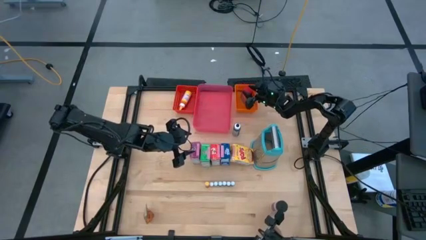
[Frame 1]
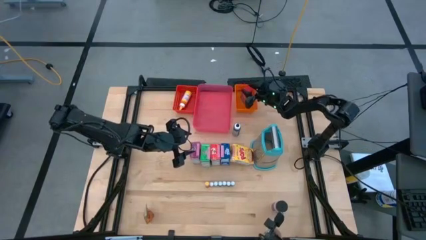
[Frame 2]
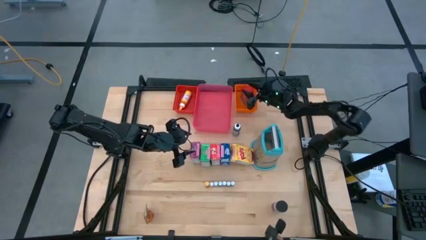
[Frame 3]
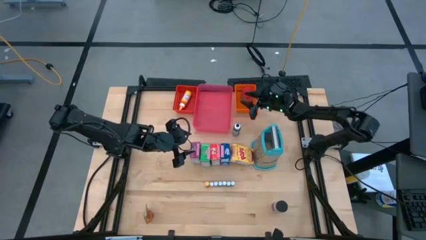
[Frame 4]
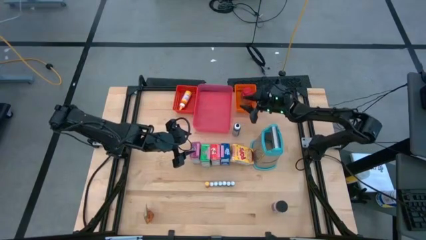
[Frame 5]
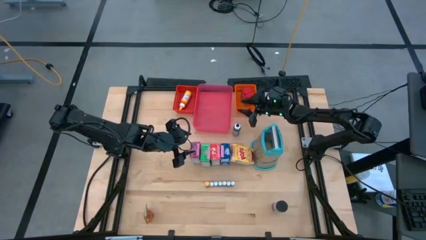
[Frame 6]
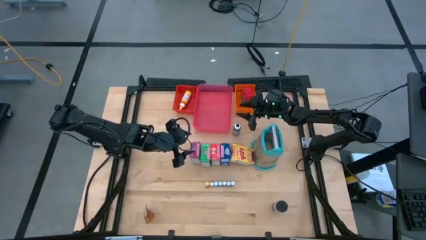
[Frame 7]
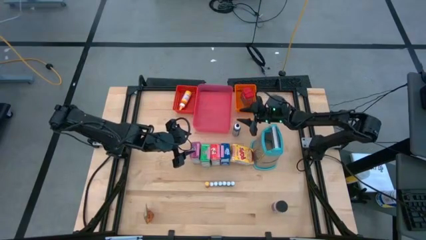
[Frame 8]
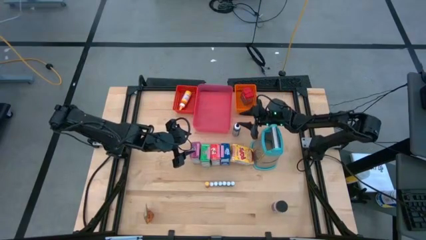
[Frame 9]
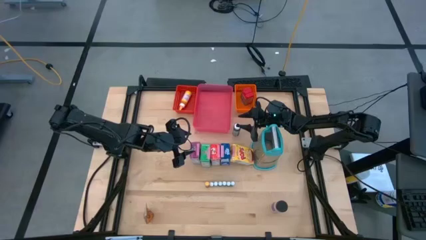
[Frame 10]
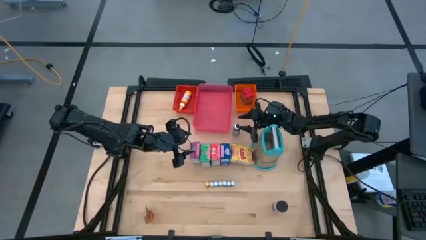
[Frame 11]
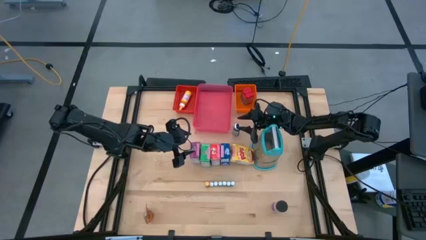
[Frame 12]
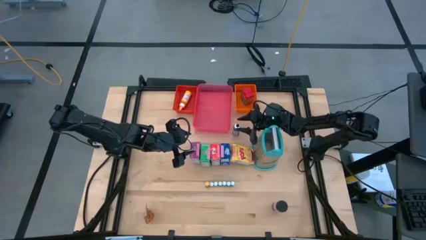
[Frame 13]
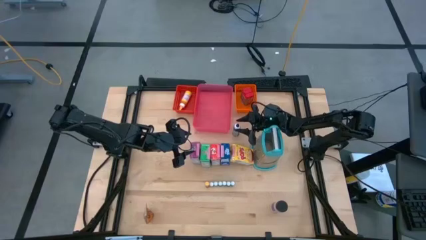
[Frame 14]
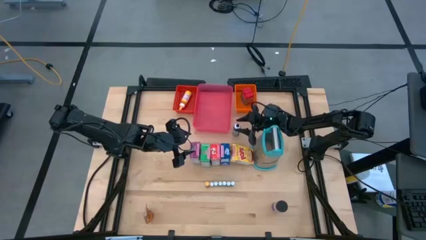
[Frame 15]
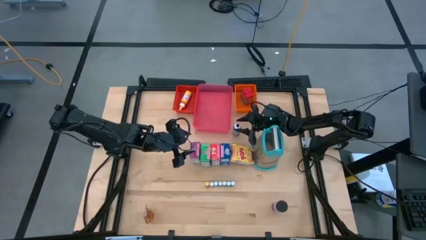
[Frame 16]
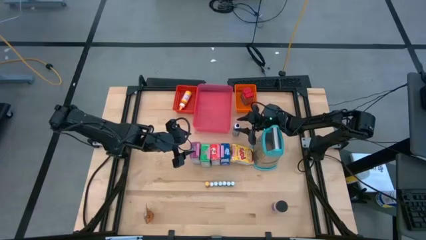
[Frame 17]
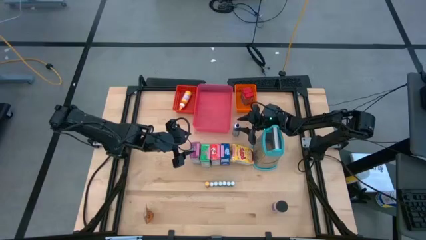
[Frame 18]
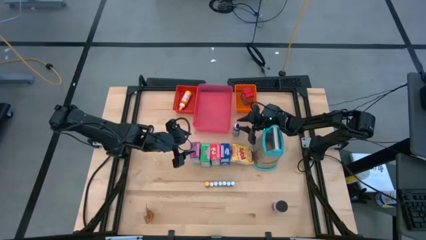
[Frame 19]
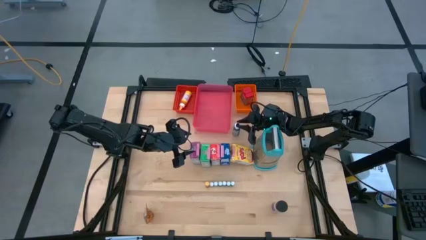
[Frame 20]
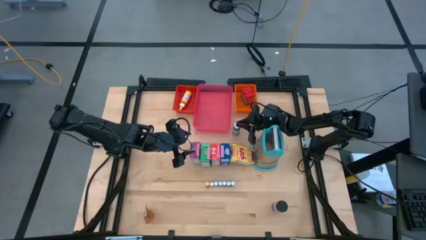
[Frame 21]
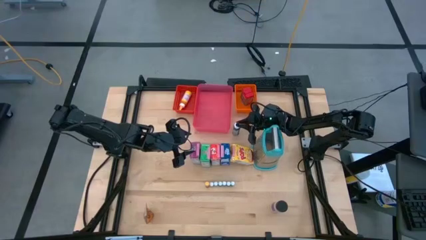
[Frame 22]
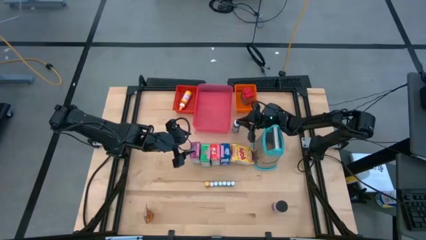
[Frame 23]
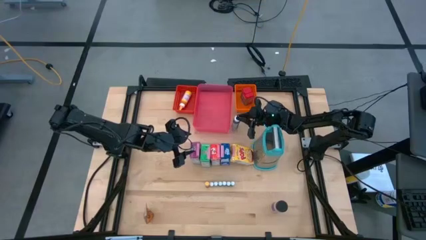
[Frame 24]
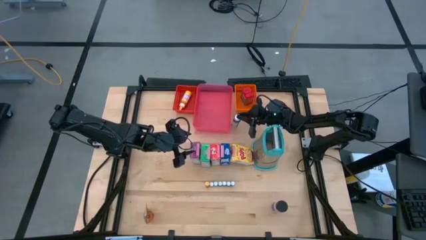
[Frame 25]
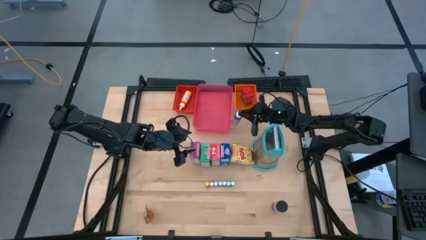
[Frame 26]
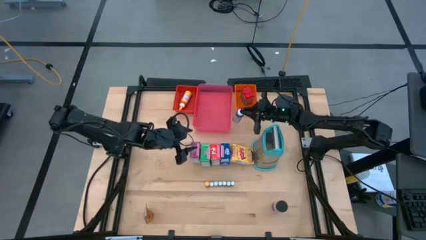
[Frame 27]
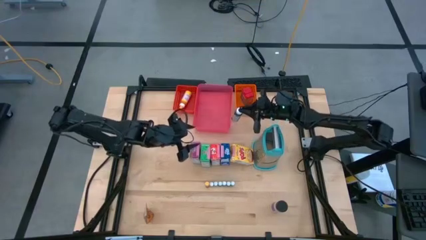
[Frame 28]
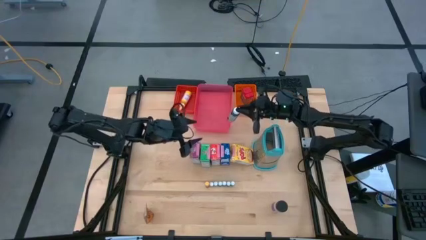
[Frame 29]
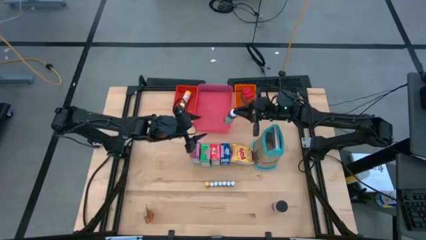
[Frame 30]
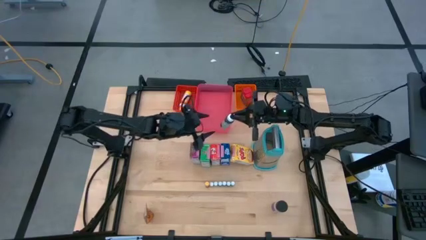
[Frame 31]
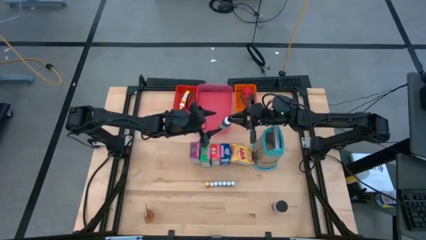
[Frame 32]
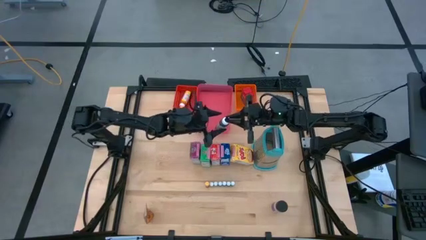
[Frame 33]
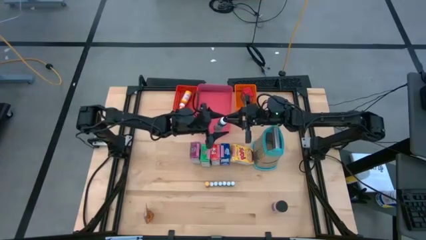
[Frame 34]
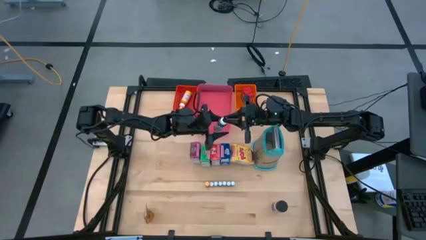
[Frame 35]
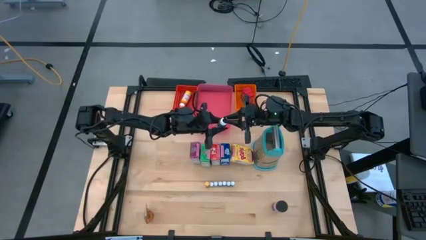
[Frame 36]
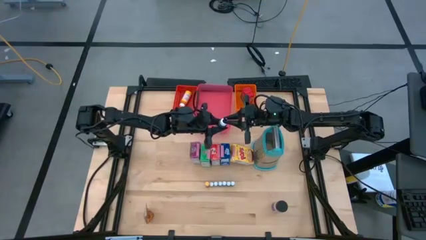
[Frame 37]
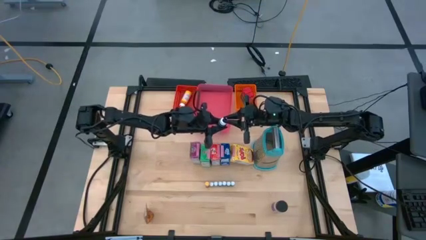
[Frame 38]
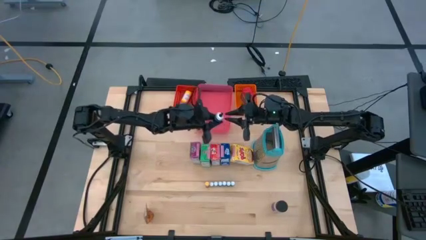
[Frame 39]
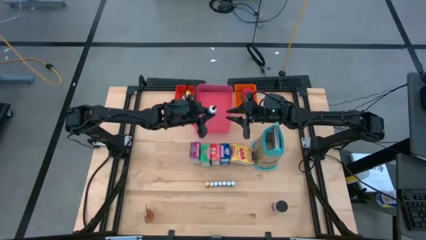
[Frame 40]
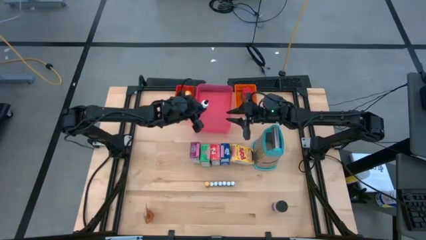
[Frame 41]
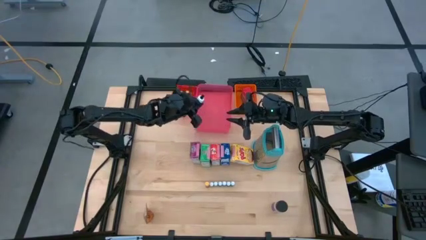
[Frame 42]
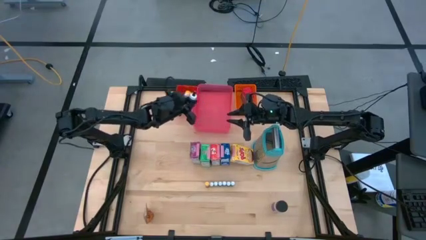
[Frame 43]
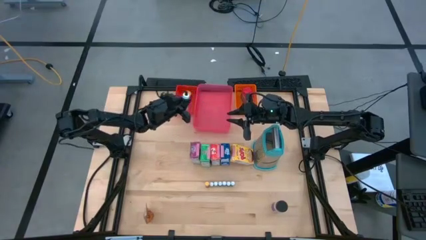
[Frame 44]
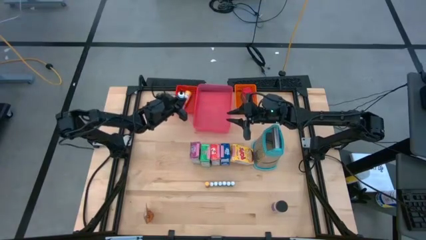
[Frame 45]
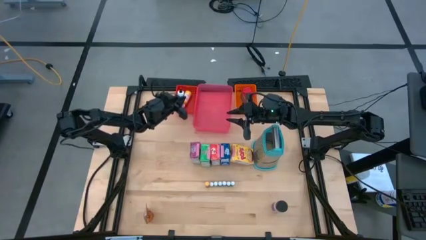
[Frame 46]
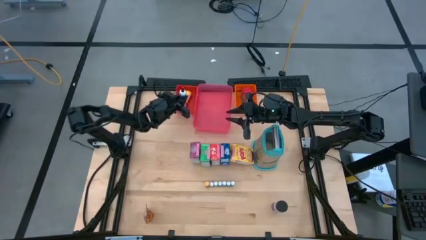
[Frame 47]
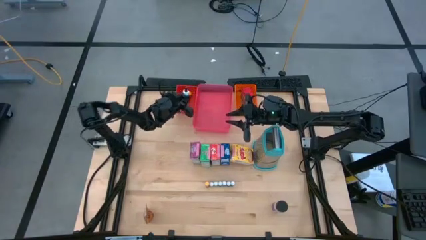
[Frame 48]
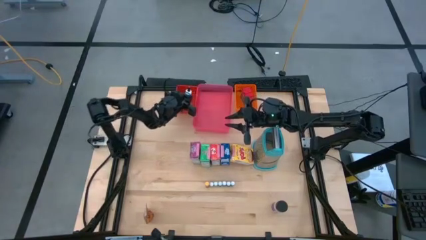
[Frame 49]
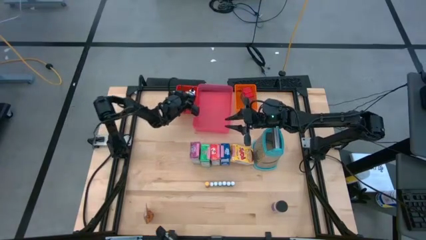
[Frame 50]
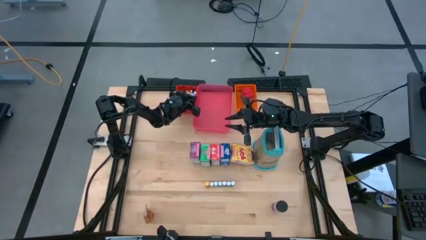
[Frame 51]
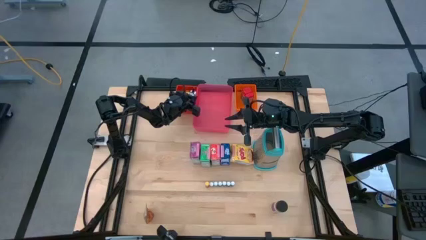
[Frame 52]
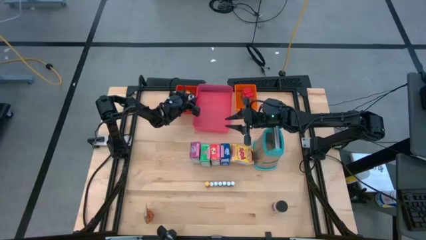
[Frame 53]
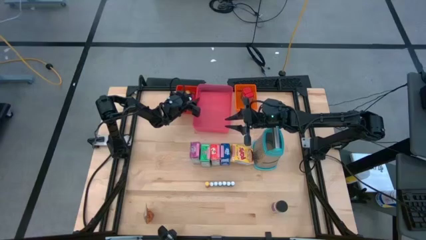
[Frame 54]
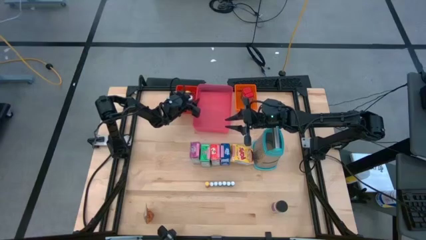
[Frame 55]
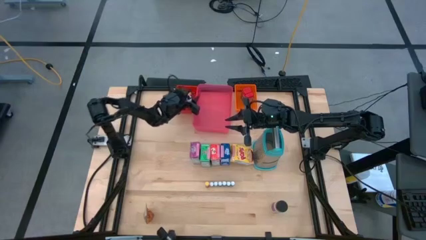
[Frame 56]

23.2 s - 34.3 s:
Task: Pick & Place Kitchen Items
Put the large black food coloring bottle into the red bin

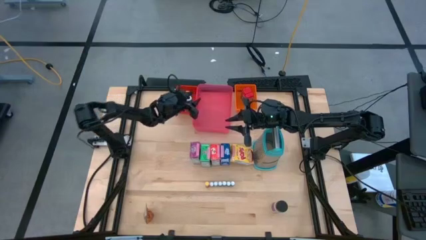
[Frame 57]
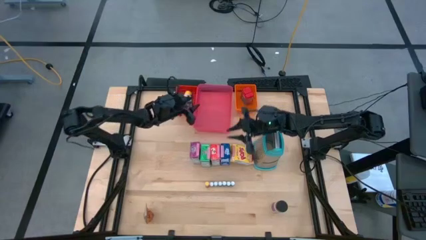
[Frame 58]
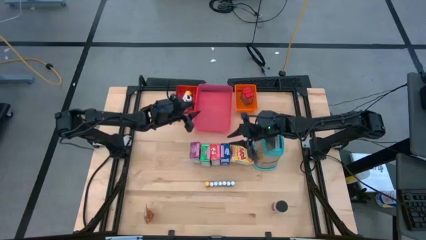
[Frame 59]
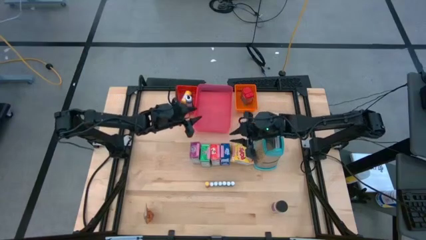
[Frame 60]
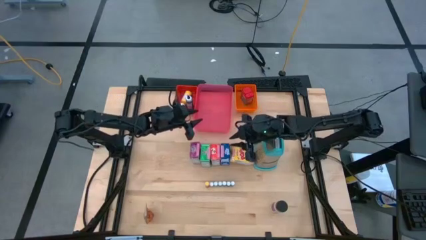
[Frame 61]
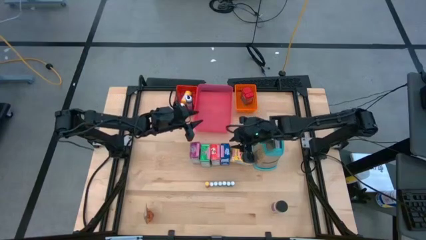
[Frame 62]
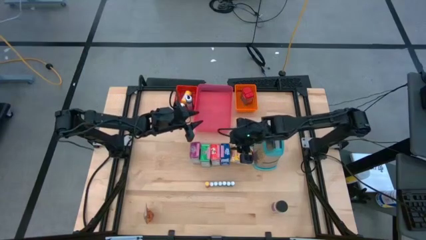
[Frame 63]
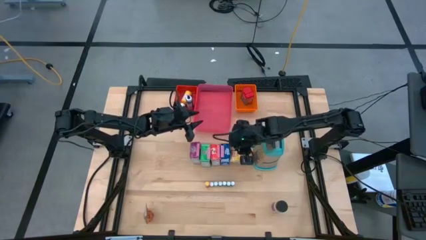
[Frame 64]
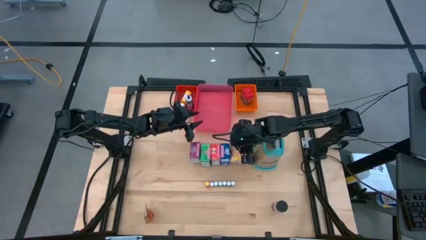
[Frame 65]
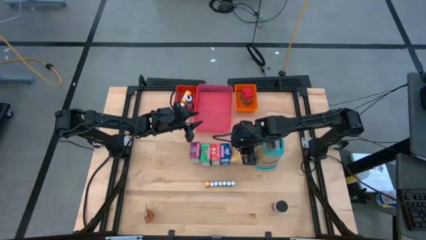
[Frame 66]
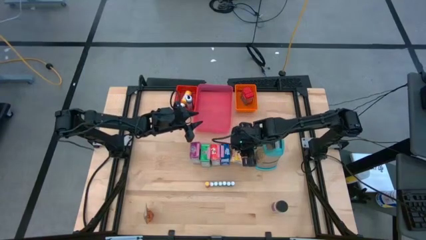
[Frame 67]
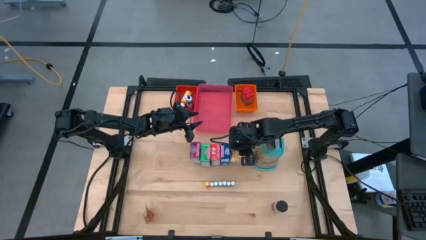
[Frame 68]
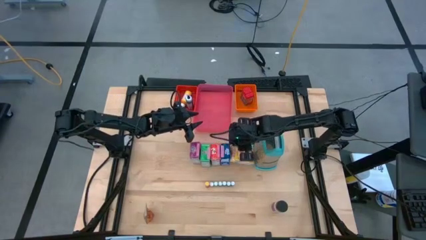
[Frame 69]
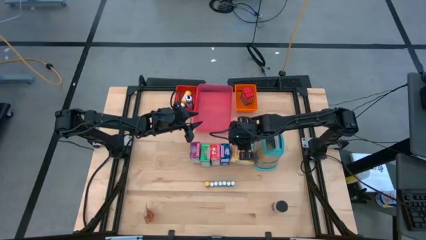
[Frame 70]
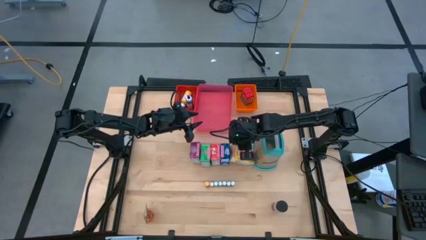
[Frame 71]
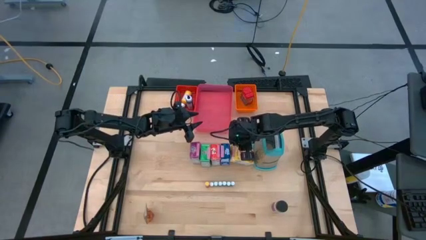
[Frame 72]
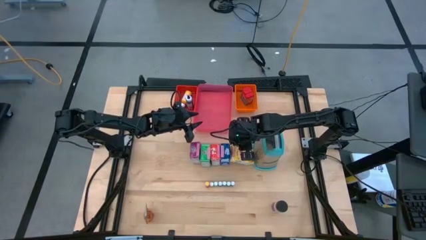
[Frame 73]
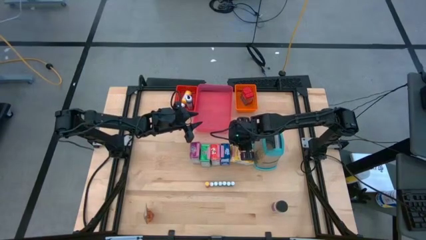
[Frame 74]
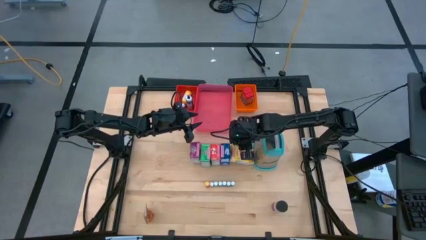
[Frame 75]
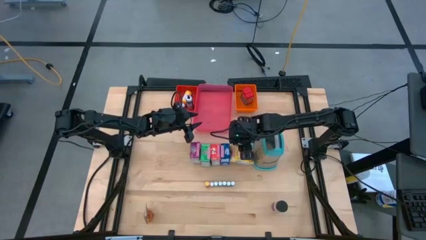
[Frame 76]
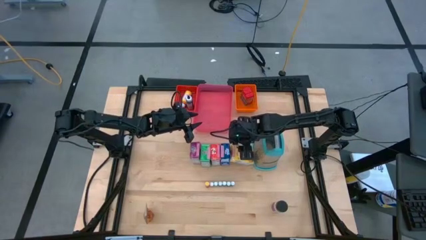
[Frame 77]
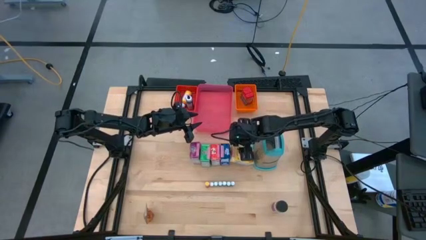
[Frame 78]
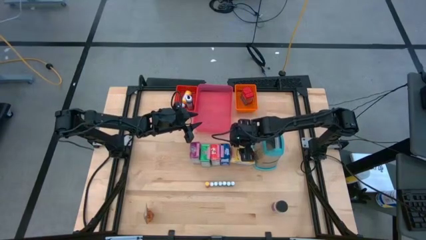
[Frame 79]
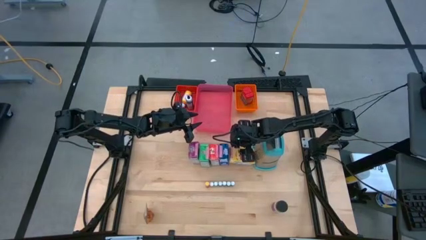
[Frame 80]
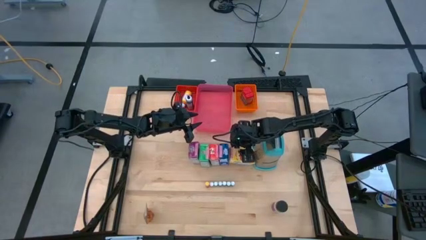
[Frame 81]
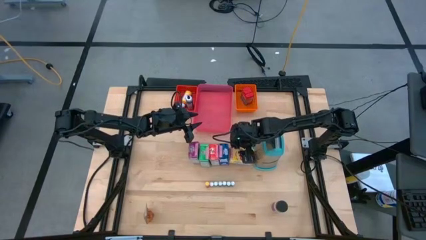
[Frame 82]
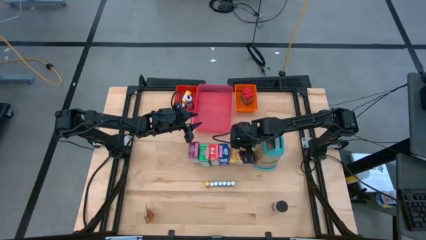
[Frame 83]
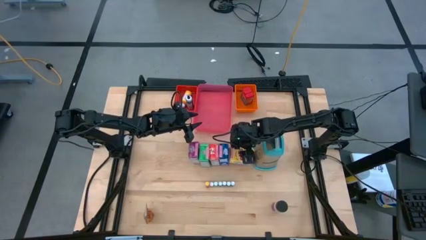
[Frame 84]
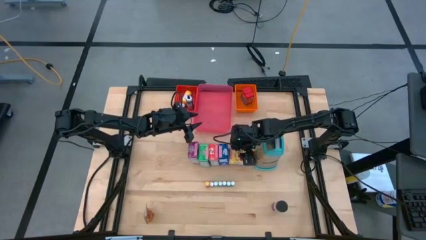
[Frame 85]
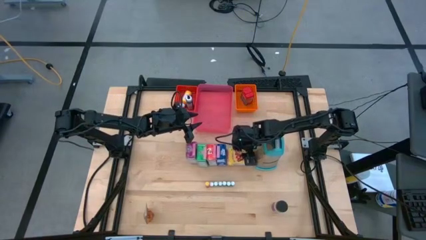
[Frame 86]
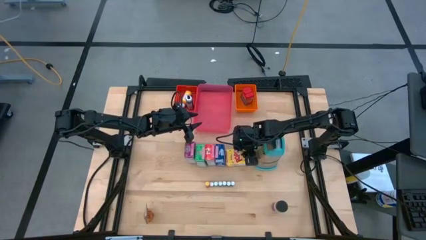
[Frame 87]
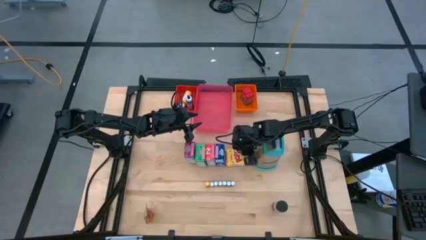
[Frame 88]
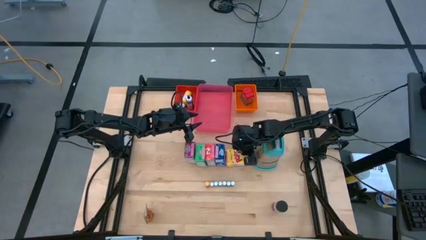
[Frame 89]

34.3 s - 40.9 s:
Put the yellow cereal box into the pink bin
